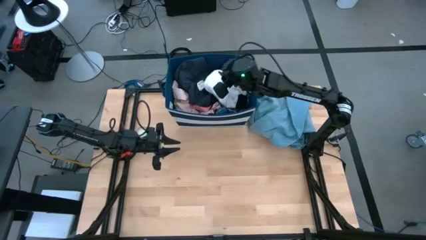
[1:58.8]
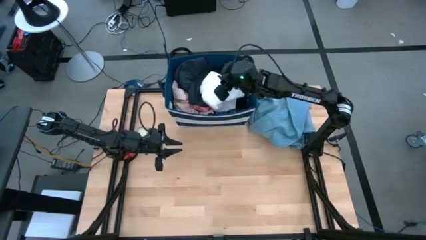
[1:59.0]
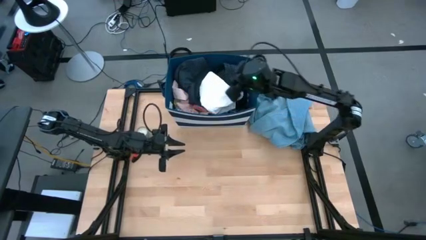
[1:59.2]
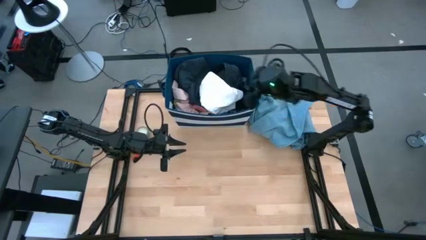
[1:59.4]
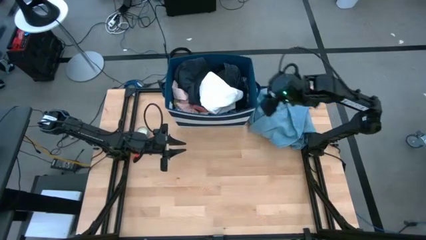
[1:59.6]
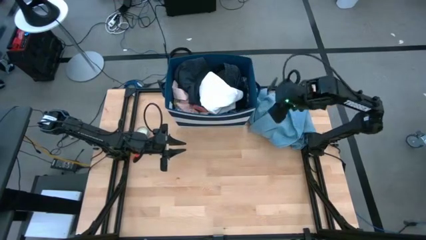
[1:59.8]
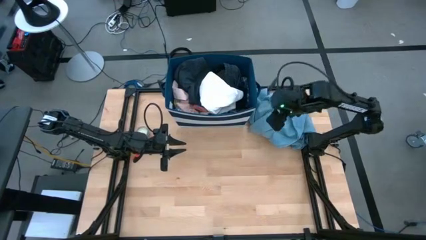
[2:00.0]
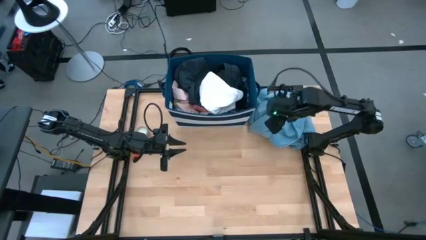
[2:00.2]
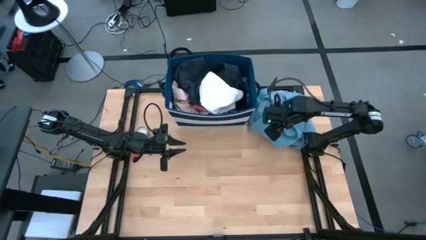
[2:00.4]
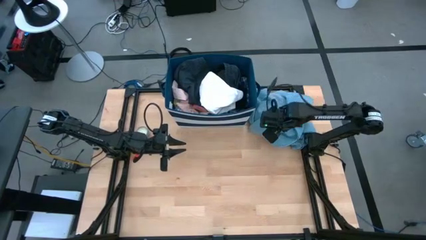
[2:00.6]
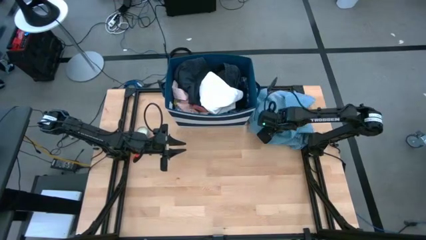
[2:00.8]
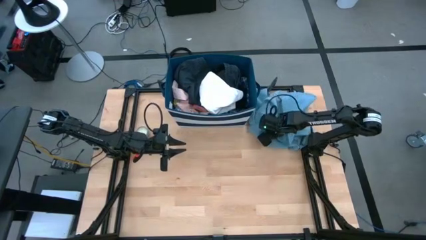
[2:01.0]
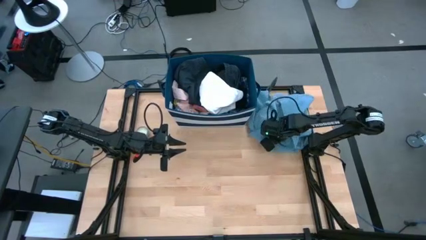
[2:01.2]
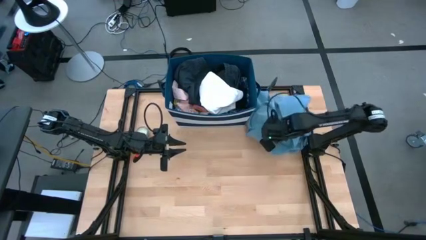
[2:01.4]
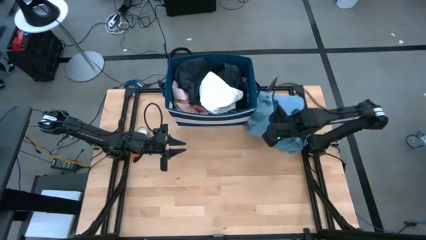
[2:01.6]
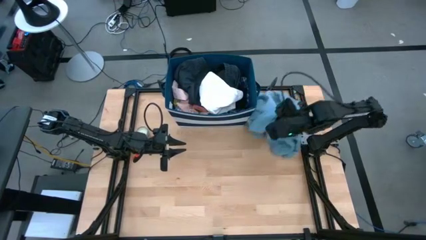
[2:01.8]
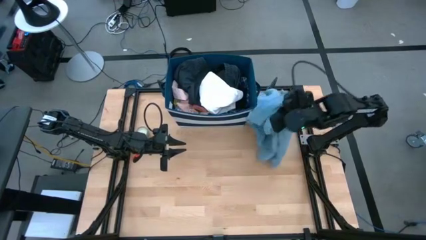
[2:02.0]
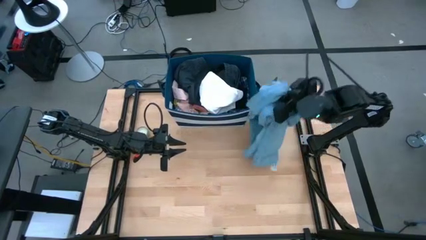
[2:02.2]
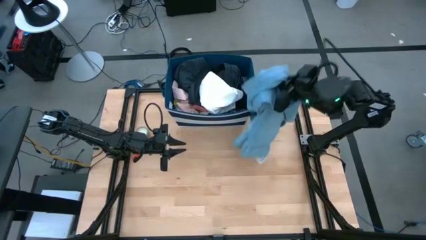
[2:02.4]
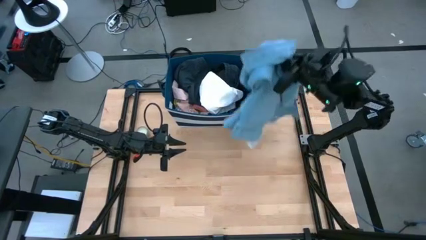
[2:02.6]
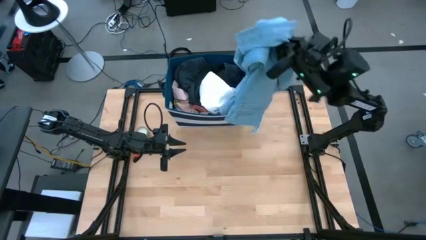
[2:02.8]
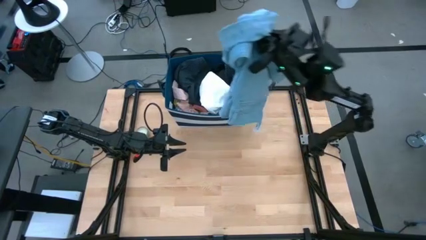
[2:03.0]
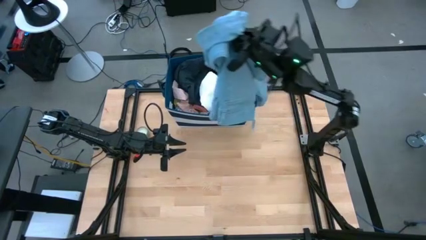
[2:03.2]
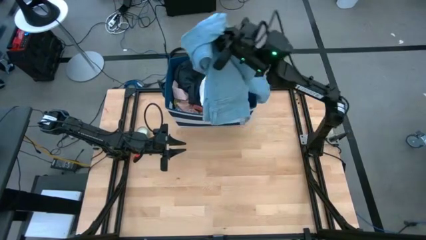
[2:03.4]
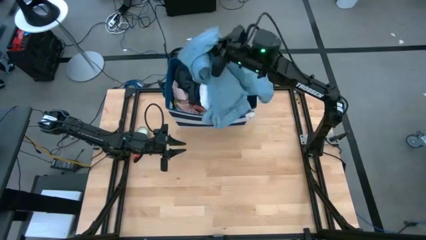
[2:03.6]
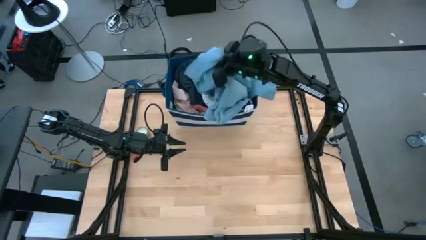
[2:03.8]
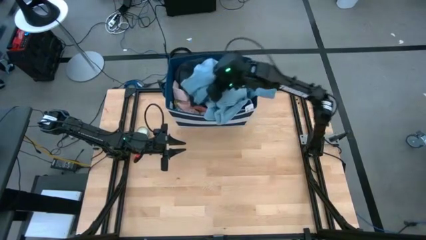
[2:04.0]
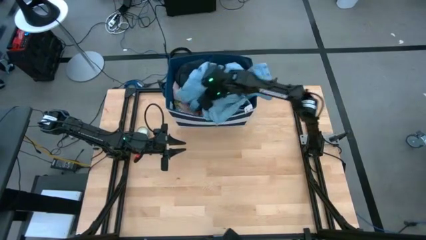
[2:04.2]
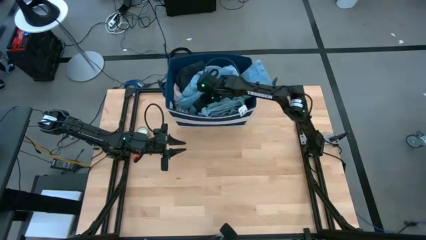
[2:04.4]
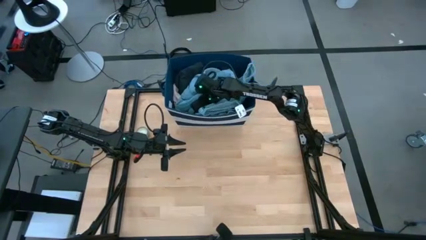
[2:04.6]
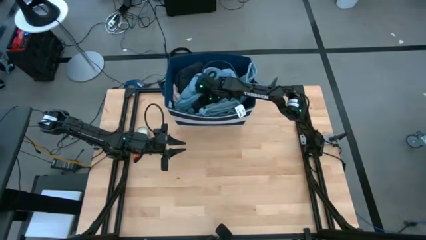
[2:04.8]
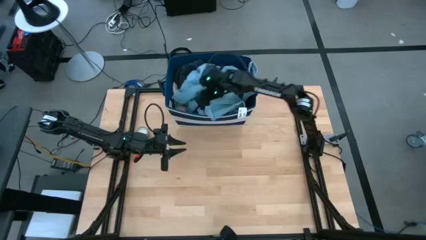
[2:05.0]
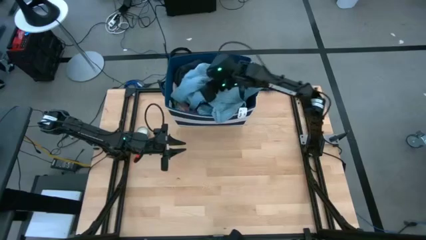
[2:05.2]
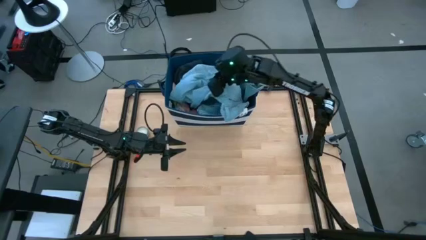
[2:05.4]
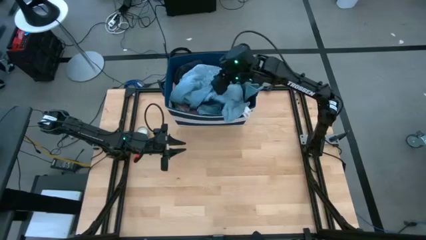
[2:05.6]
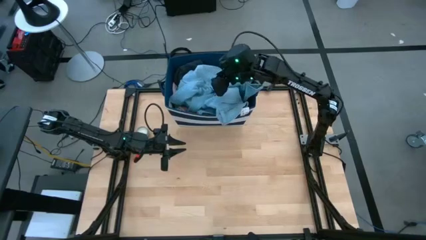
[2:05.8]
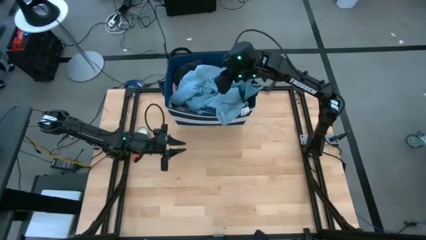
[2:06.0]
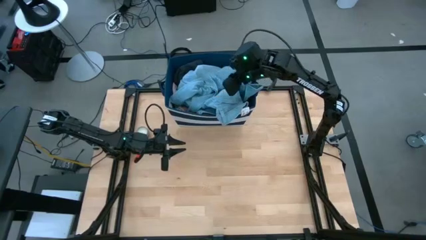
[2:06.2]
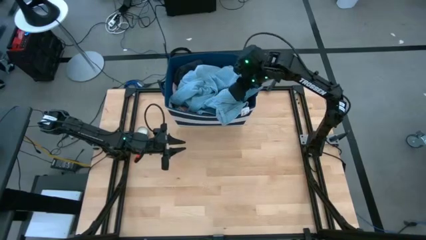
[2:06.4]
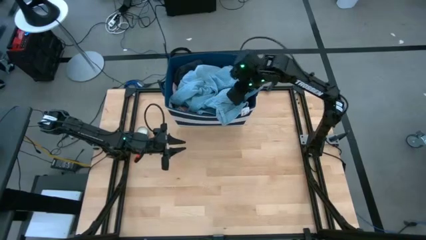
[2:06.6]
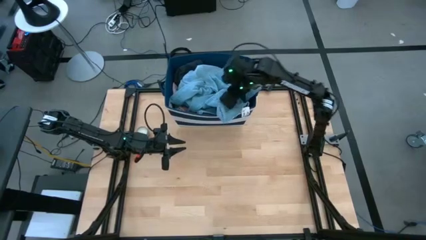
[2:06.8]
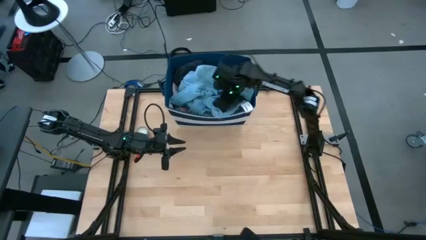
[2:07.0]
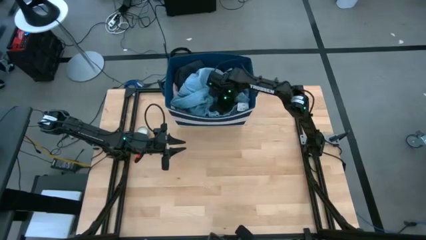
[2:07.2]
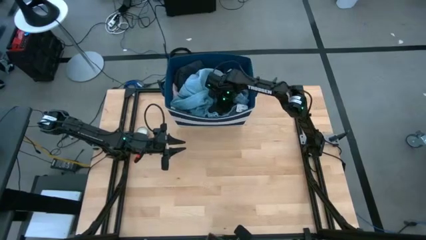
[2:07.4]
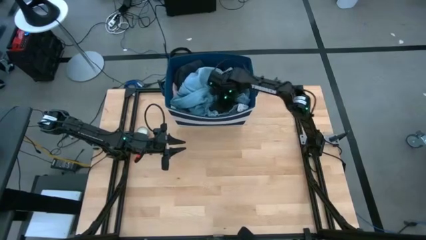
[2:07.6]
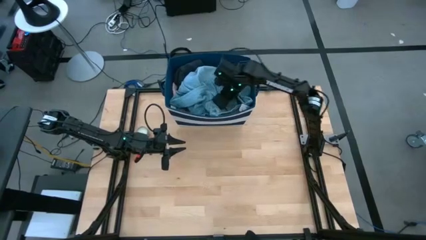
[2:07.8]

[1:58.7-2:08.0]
Task: Sort clothes
Put the blue pants into the blue laundry organizer

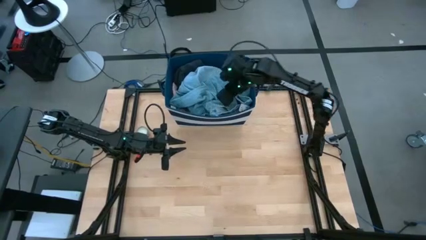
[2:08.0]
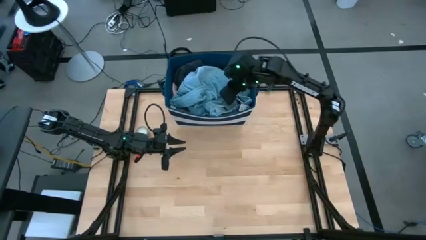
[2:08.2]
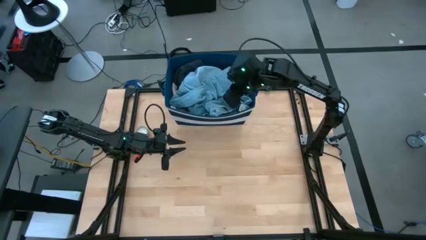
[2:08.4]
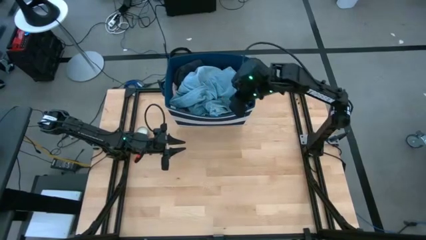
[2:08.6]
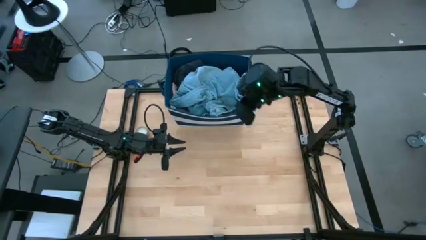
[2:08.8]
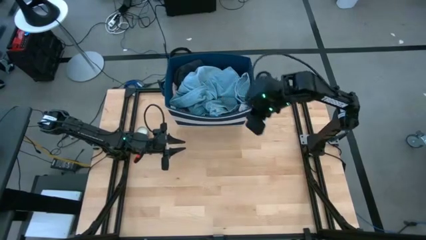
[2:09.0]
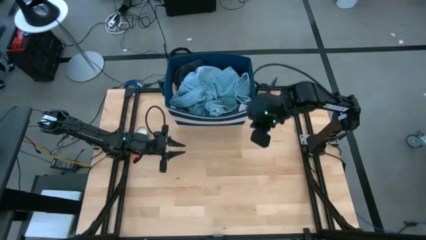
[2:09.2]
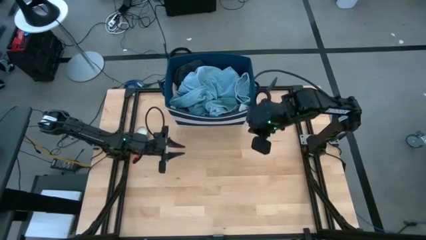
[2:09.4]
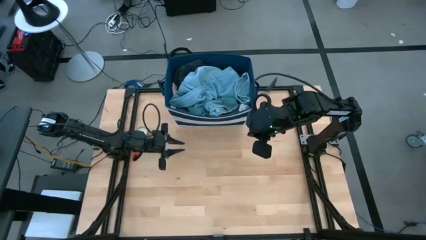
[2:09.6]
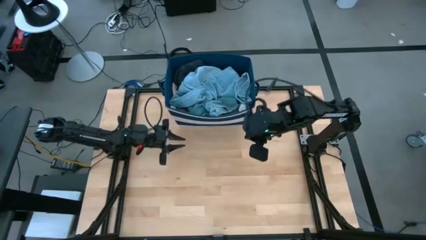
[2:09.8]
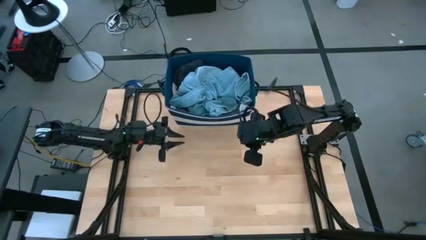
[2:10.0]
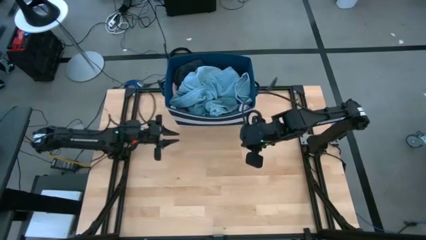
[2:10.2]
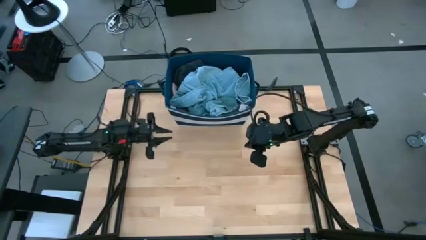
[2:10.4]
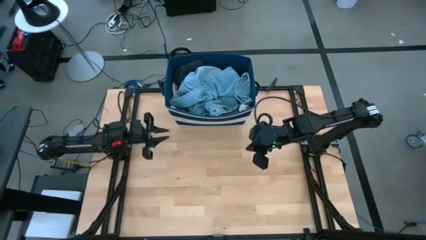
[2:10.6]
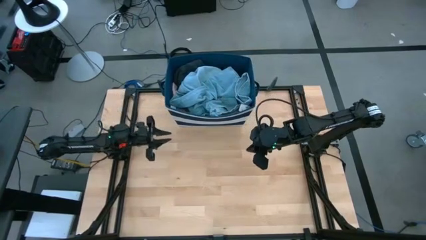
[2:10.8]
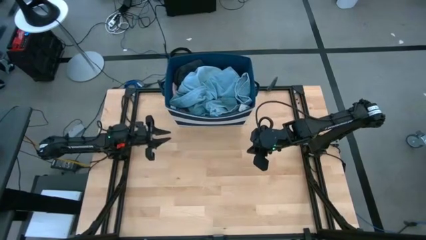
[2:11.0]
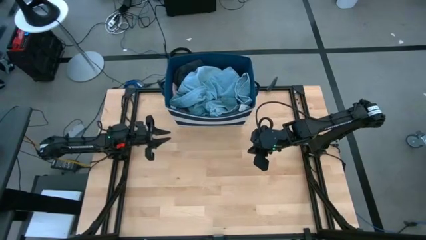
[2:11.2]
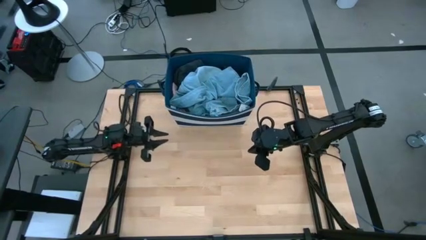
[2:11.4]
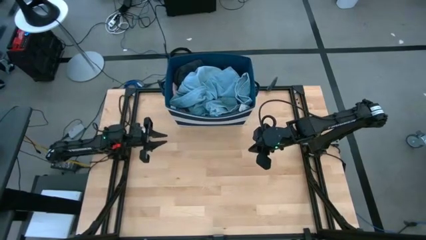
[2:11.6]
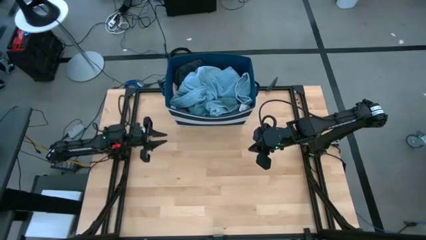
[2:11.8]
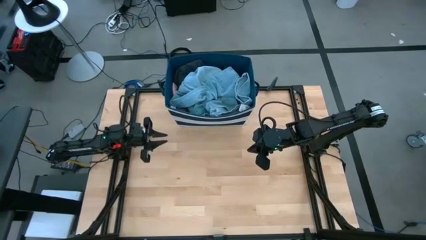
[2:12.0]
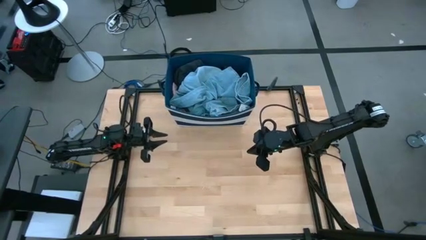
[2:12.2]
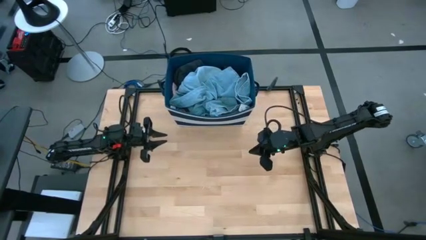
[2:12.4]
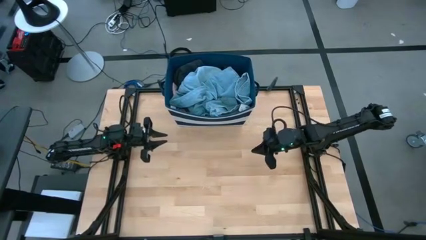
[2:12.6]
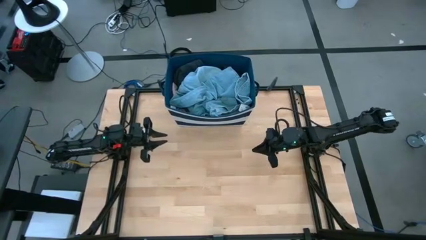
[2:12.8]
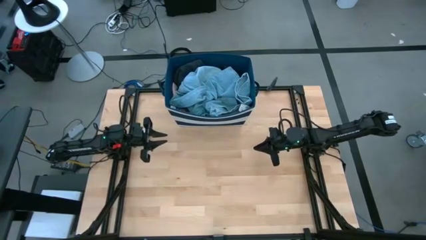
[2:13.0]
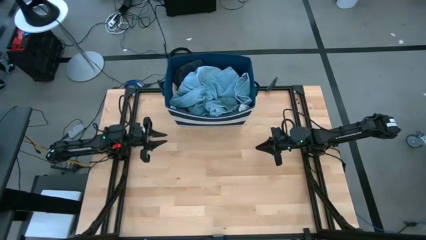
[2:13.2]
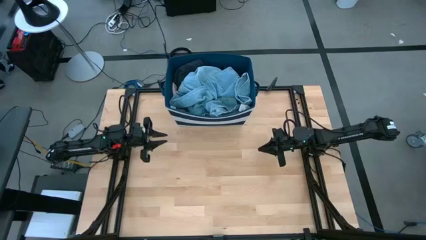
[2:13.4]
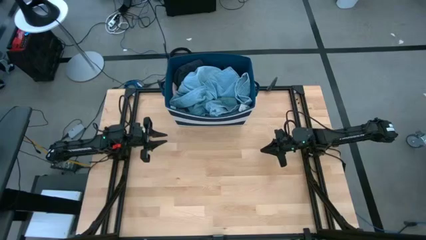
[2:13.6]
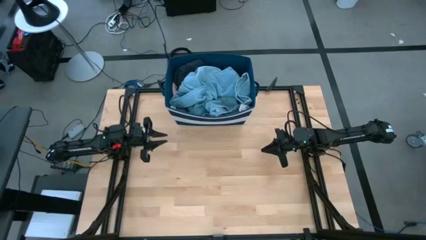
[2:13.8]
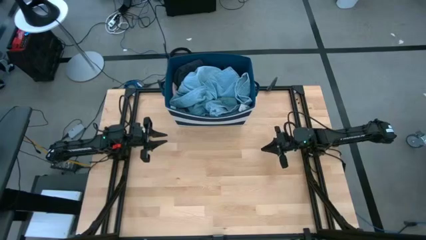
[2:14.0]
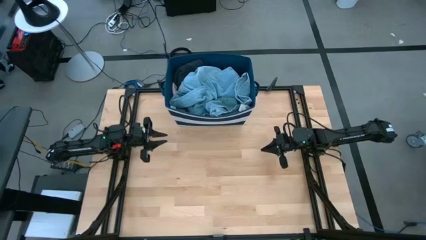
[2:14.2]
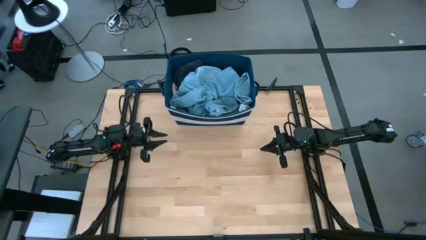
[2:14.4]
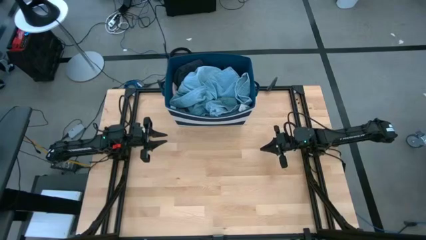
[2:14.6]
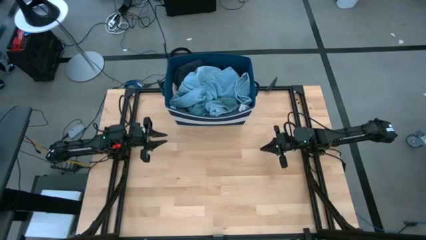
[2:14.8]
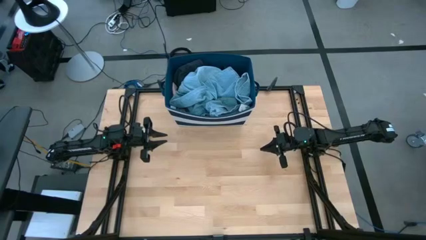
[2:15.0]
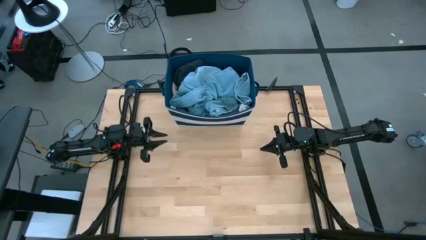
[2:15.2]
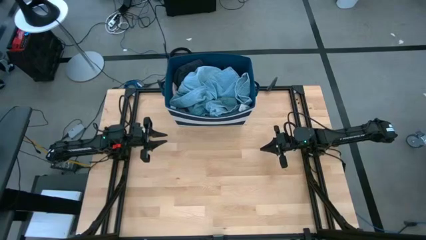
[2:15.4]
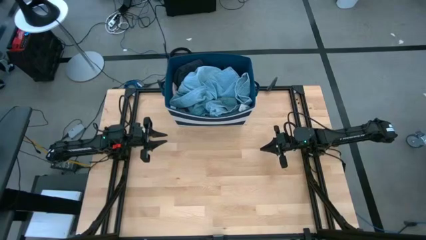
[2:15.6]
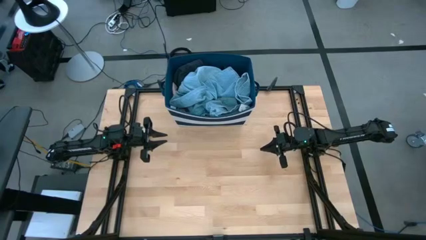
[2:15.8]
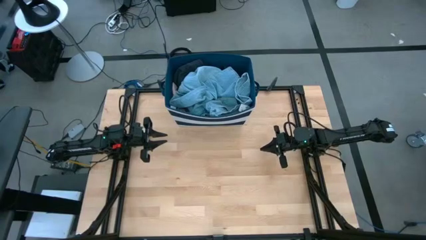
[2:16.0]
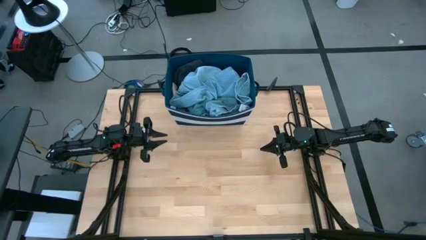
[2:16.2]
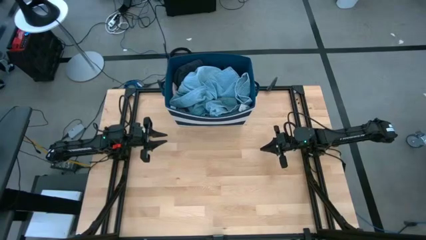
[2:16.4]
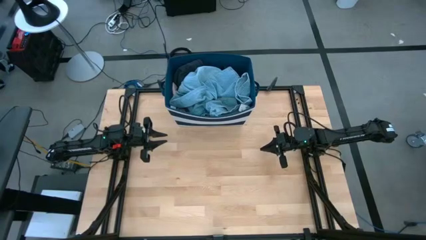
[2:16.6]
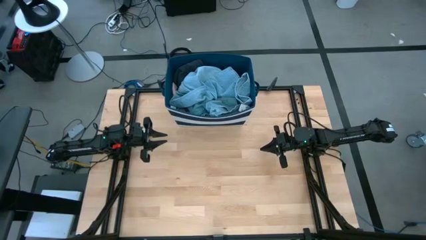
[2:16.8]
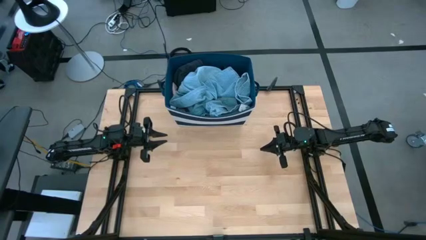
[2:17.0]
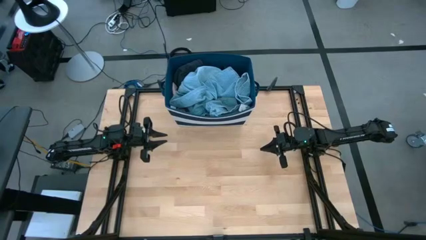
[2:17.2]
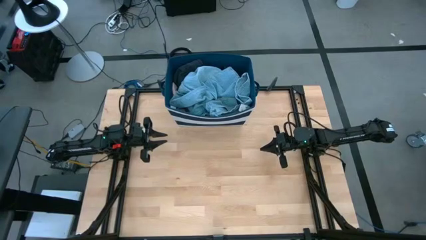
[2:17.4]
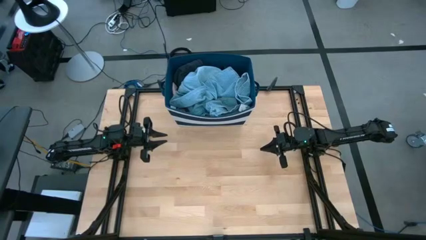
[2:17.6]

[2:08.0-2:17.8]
Return to Home Position
